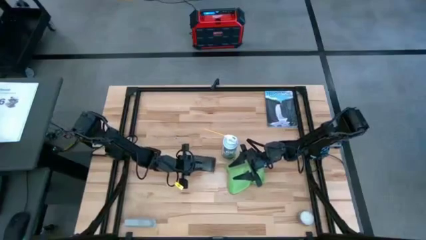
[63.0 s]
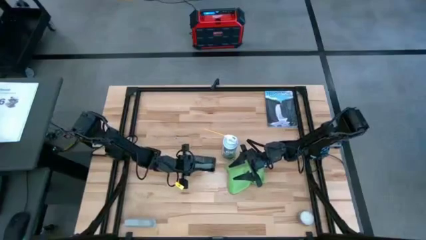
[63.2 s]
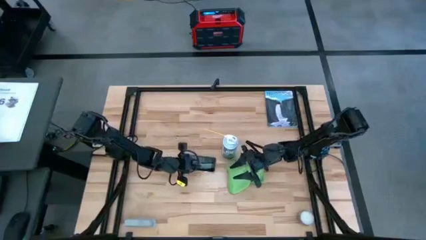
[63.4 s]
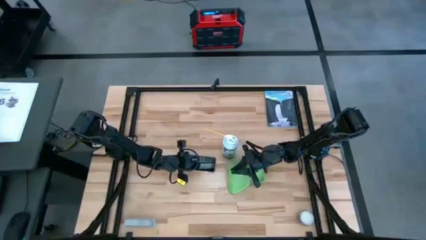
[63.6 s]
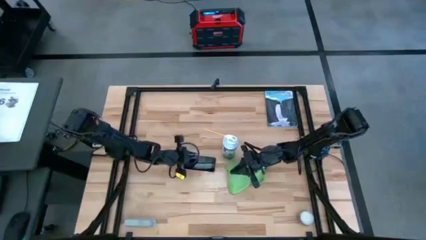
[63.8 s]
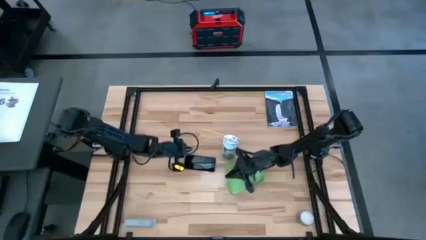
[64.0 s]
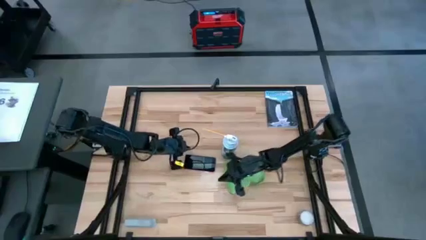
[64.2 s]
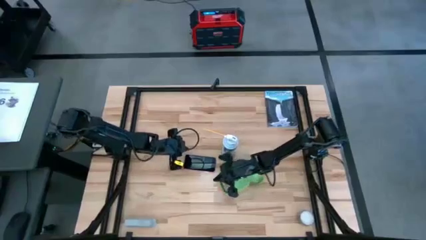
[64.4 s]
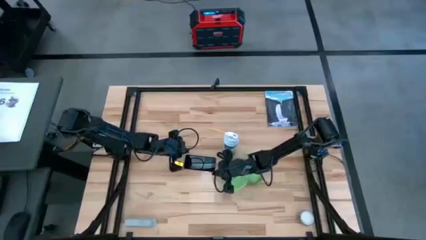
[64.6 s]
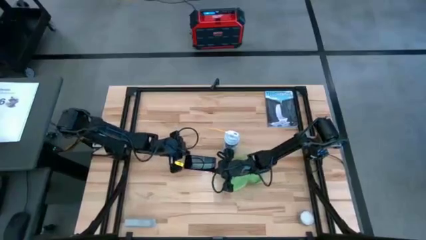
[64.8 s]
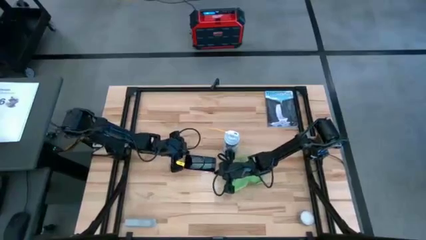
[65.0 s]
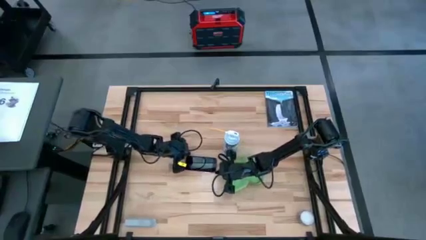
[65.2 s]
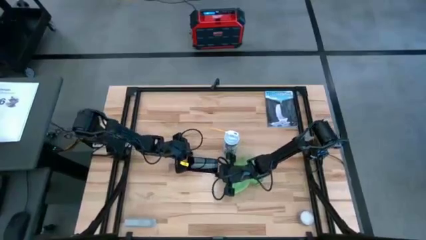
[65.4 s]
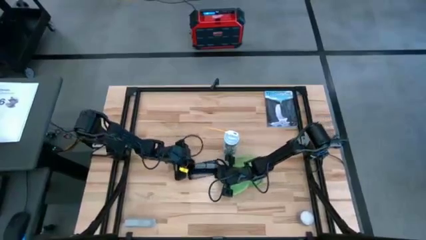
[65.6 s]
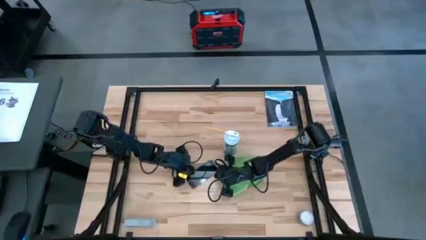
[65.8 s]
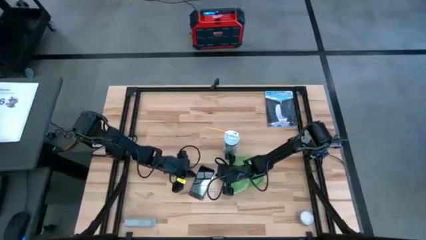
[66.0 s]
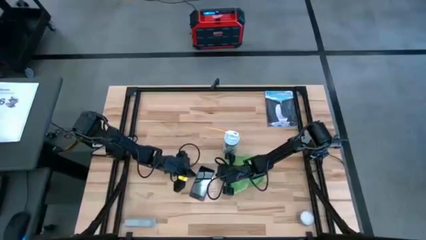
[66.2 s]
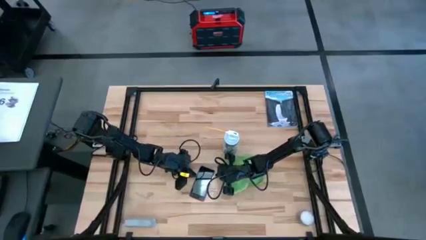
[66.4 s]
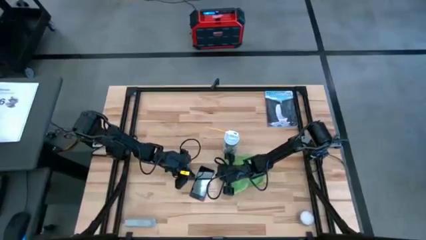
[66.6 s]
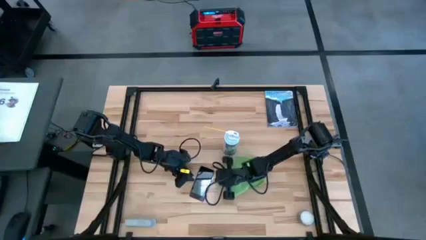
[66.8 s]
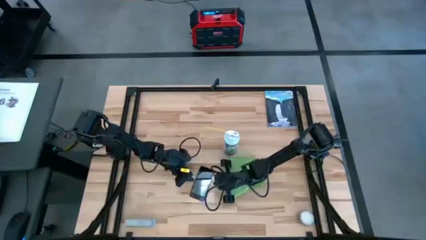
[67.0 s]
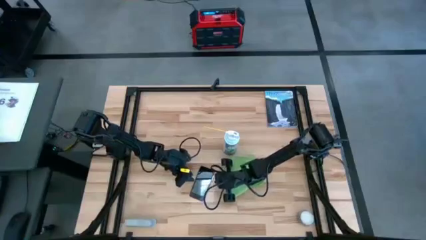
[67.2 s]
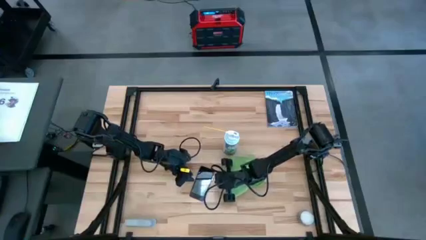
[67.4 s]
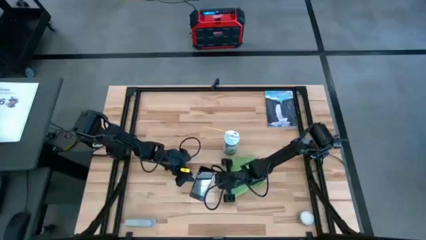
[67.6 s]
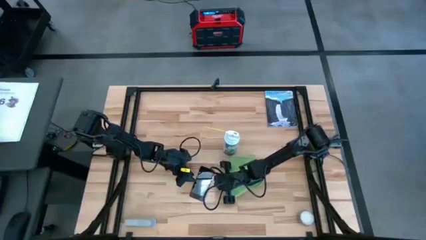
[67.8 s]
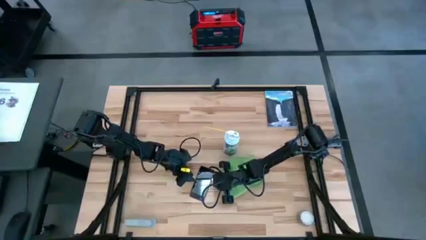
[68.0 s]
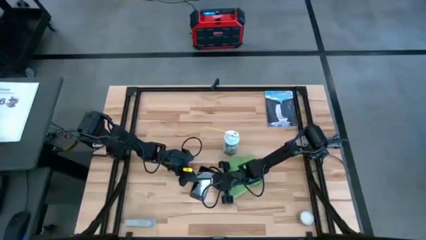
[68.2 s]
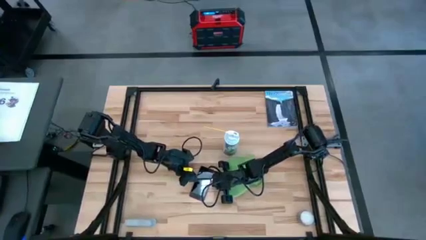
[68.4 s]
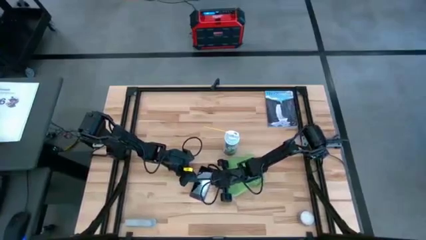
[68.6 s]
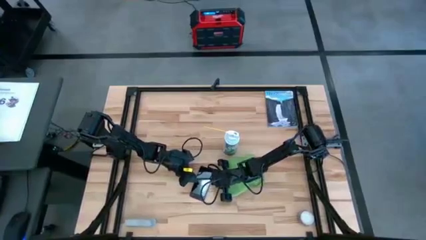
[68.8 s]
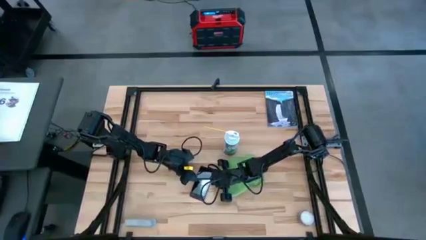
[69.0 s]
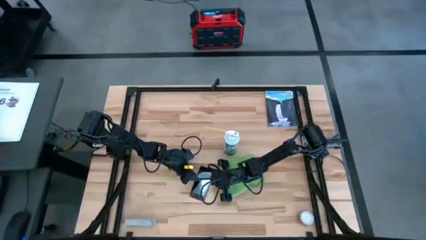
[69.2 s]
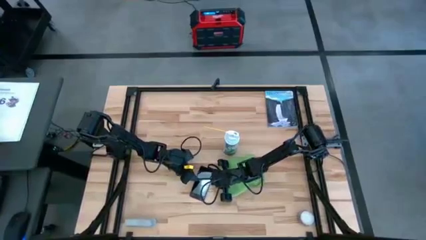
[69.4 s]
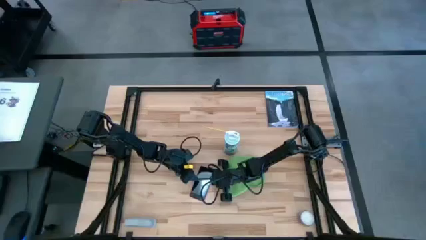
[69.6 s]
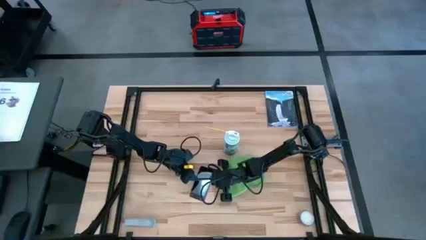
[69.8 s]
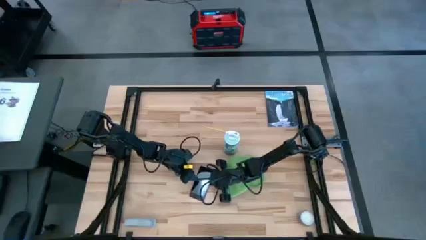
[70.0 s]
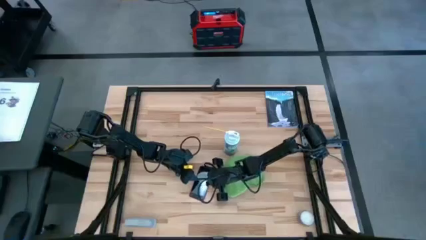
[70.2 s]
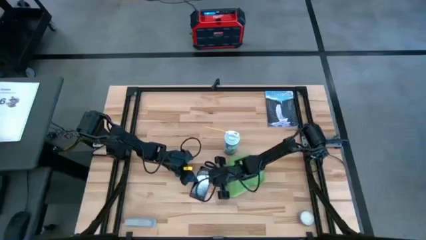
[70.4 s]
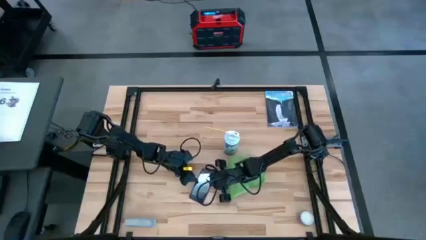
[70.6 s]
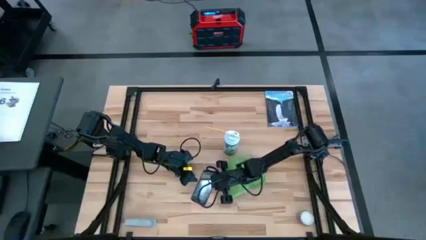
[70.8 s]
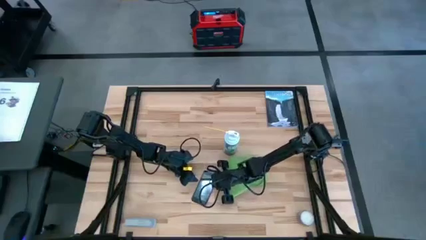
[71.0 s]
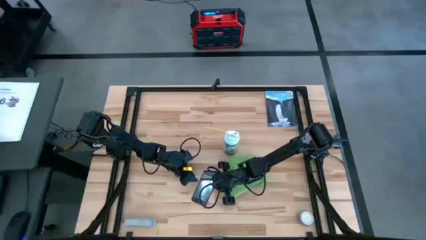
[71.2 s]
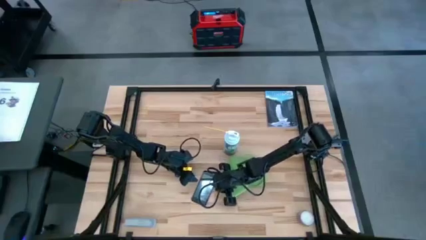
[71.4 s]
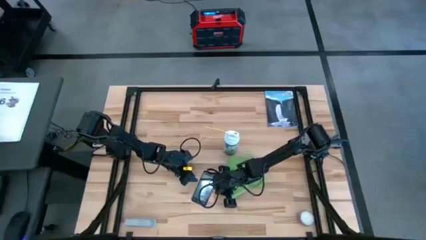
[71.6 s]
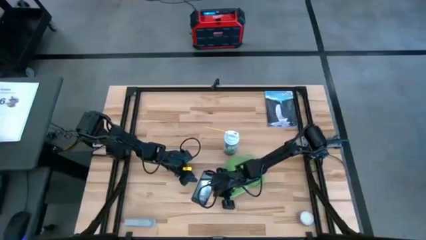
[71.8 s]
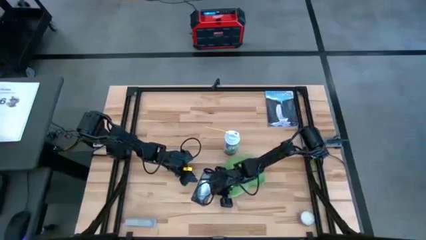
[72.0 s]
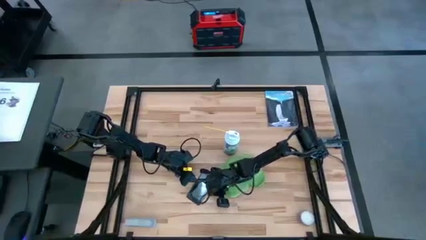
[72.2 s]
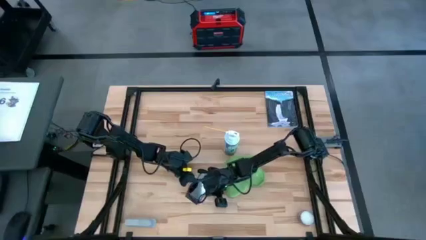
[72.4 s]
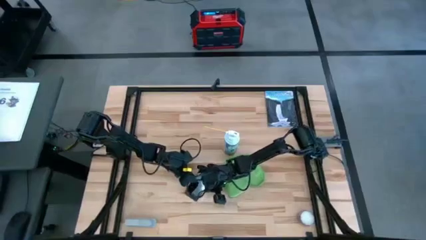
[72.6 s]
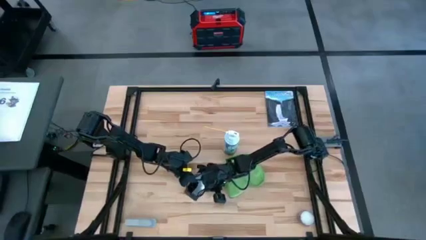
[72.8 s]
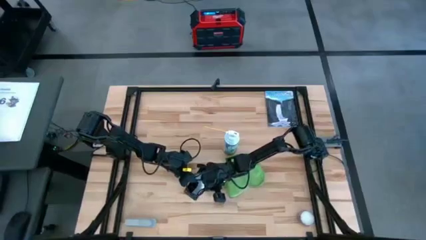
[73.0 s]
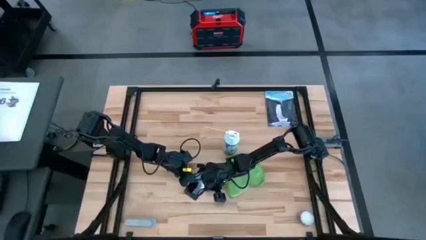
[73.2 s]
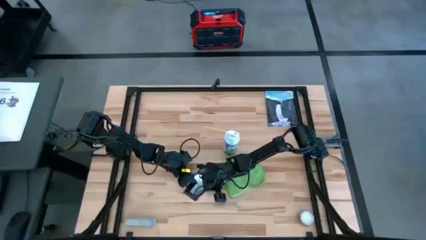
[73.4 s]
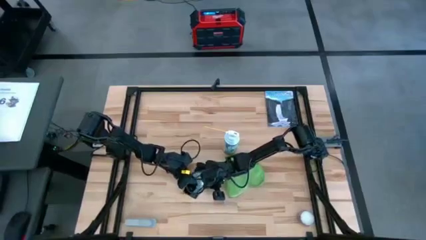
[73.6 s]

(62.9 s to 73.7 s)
Task: Apply microfiber cloth
Spray the front of the pink phone using the white spray bottle

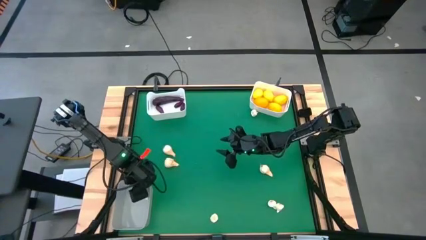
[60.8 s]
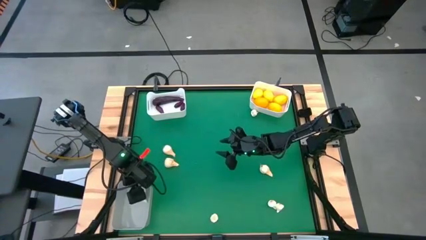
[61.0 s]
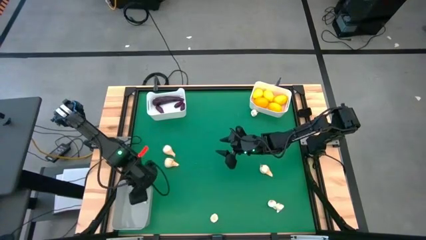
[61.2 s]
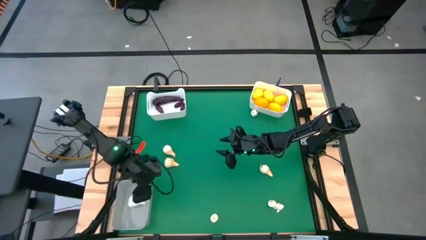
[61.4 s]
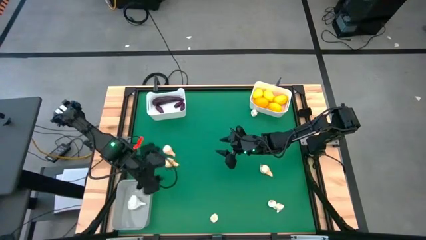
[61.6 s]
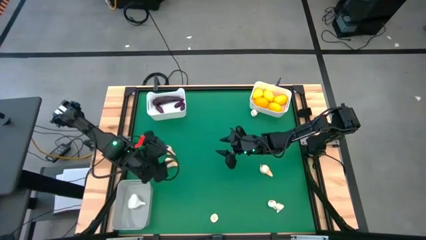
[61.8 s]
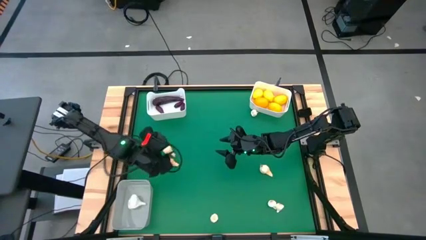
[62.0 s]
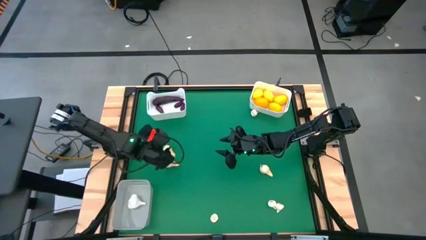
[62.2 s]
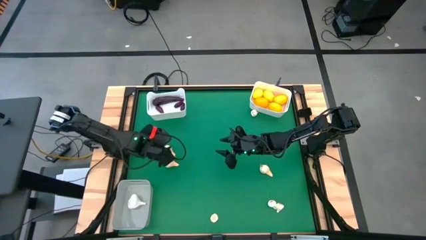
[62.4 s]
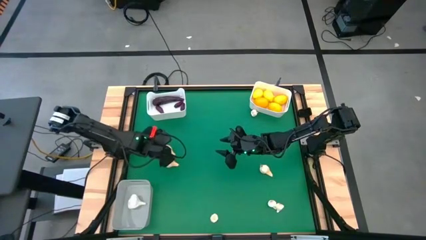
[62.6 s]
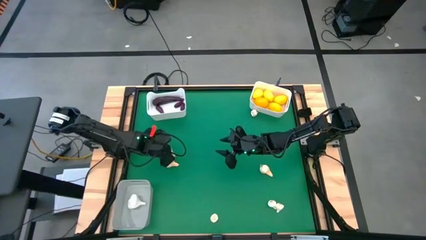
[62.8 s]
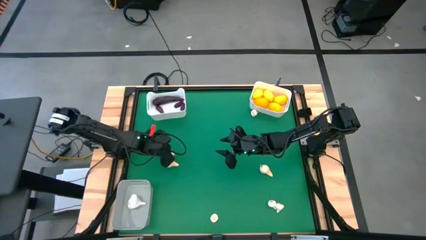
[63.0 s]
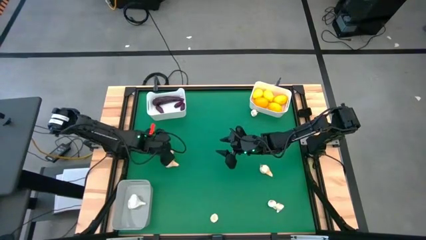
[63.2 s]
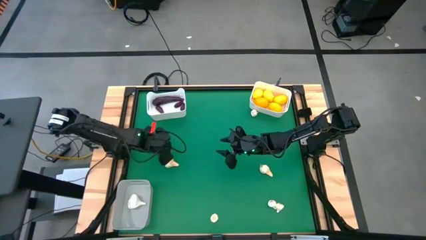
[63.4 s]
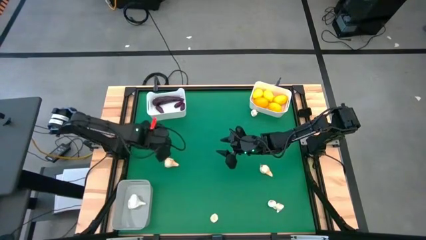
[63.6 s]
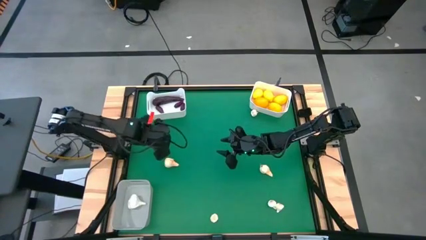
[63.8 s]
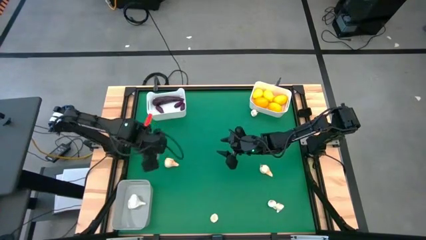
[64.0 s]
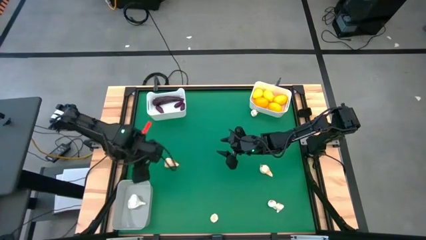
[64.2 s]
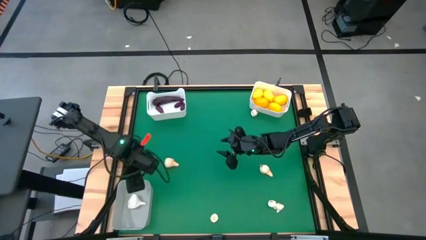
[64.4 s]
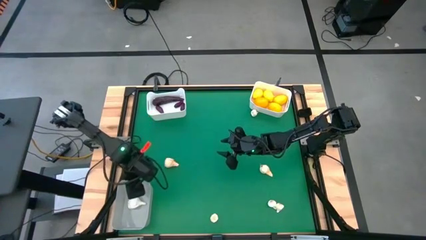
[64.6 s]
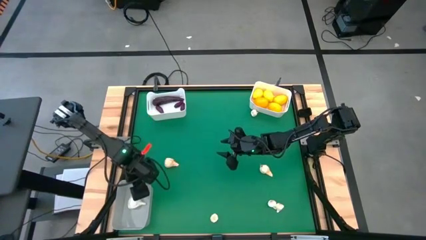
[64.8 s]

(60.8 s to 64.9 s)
Task: Sort produce into baskets
Put the middle left white garlic into the gray bin

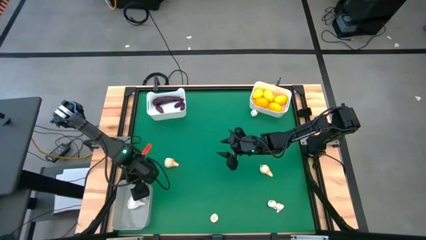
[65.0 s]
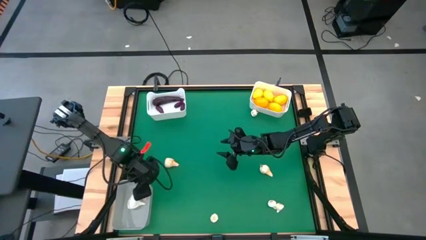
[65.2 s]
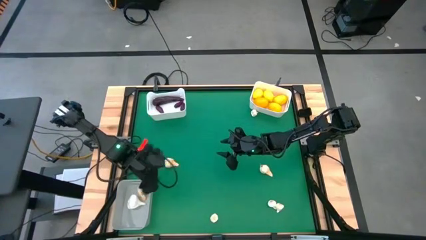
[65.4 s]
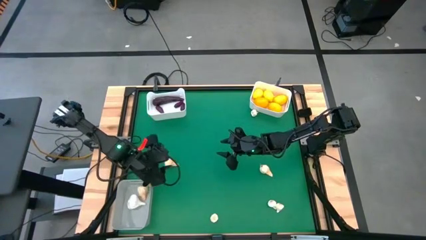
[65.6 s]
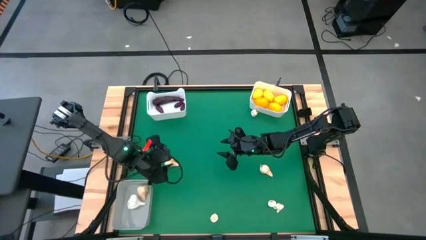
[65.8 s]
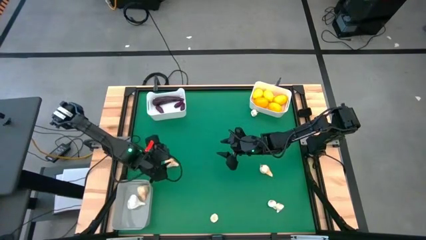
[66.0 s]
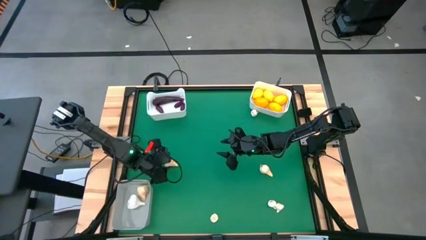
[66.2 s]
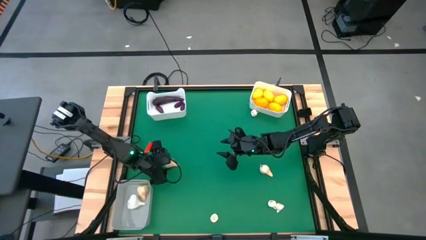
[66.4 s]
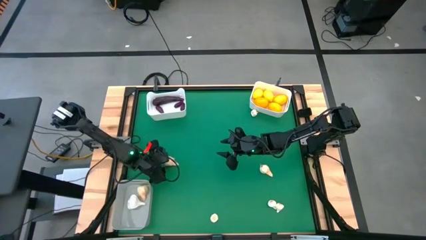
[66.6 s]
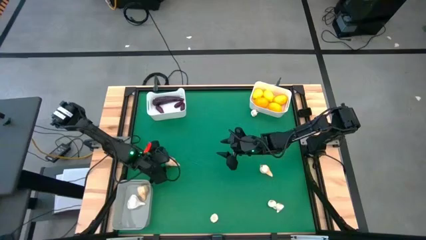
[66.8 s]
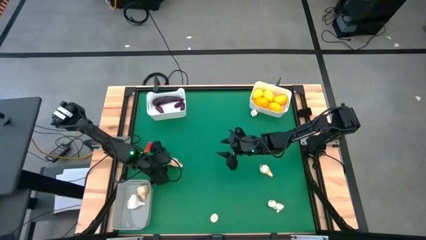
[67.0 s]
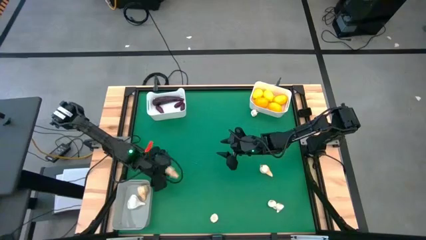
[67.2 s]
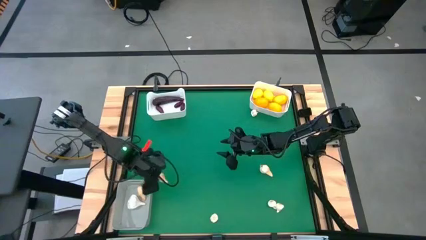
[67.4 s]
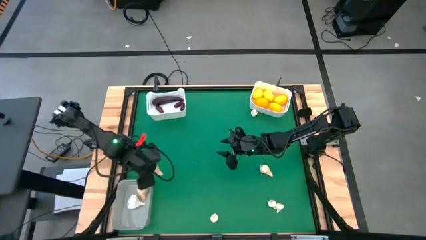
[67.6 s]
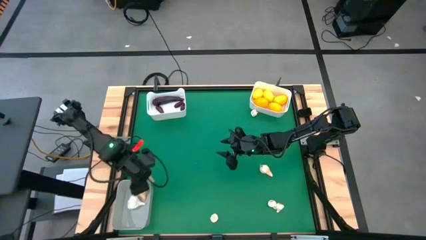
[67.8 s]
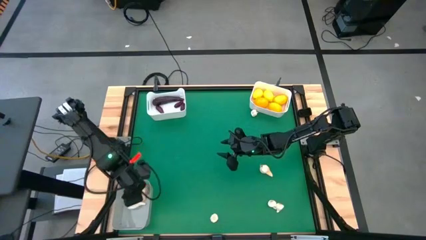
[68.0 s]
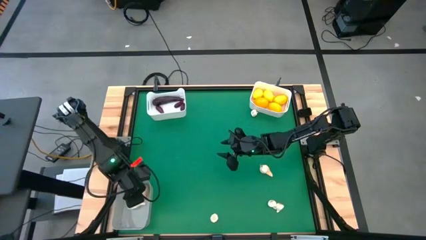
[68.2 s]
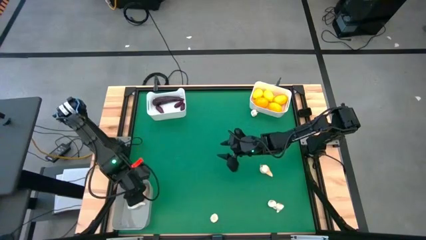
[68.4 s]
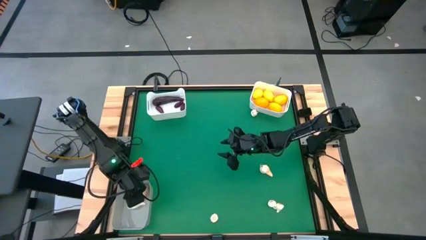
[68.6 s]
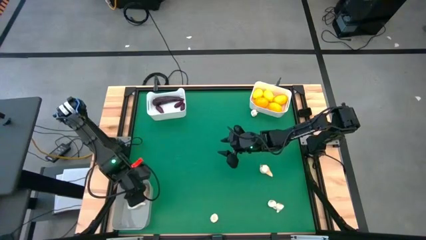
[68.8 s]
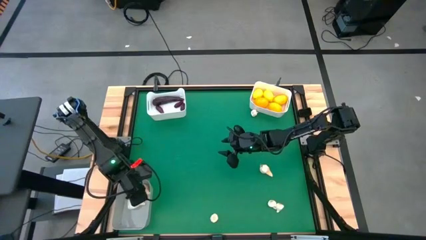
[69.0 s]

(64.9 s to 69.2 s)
Put the middle left white garlic into the gray bin
